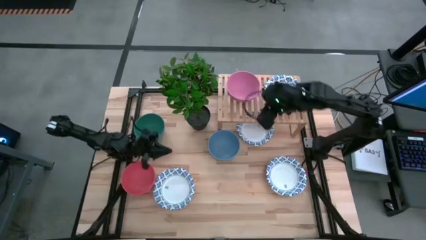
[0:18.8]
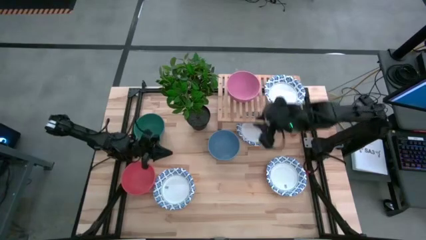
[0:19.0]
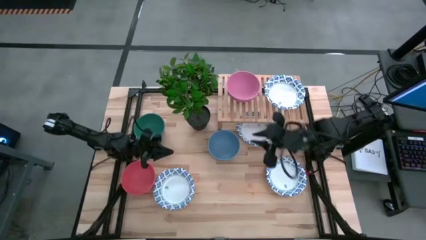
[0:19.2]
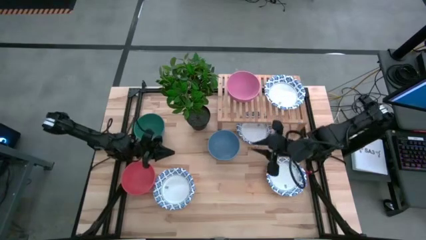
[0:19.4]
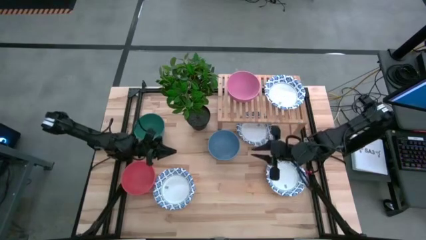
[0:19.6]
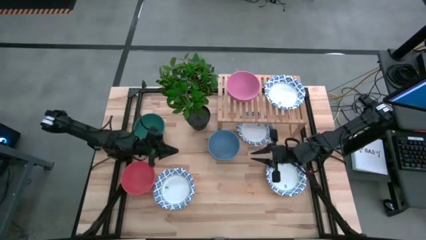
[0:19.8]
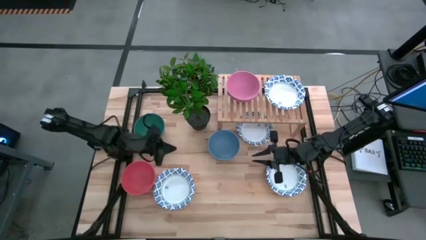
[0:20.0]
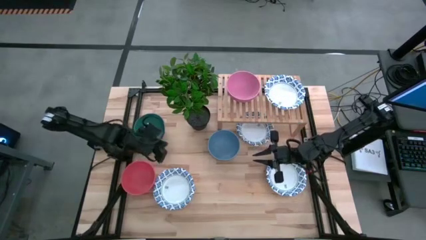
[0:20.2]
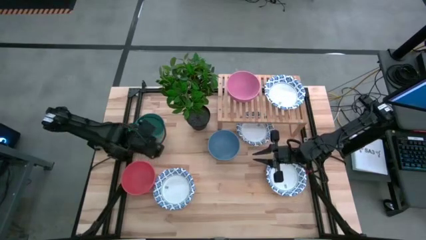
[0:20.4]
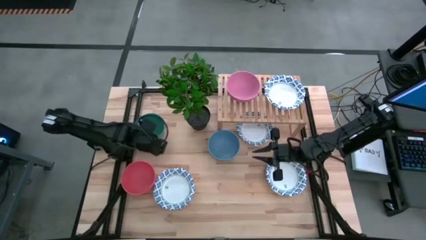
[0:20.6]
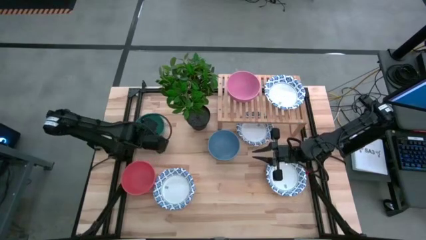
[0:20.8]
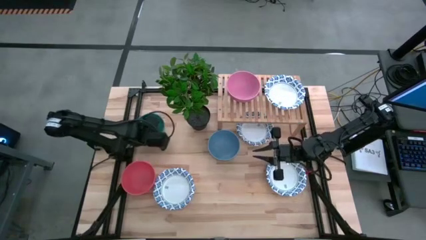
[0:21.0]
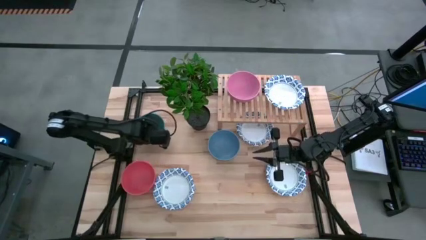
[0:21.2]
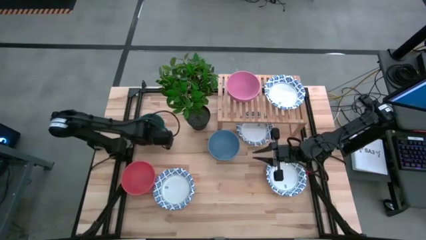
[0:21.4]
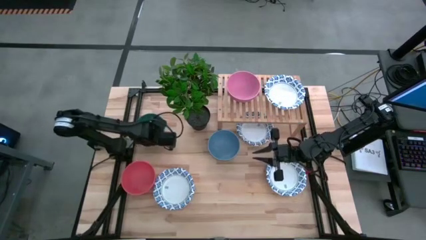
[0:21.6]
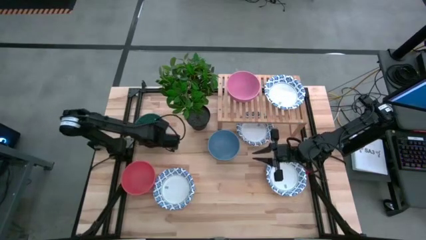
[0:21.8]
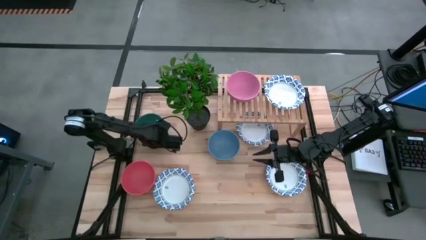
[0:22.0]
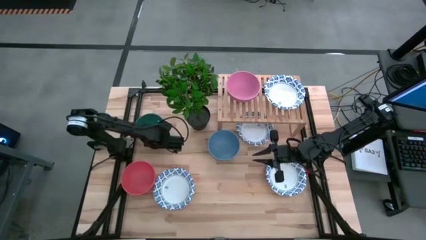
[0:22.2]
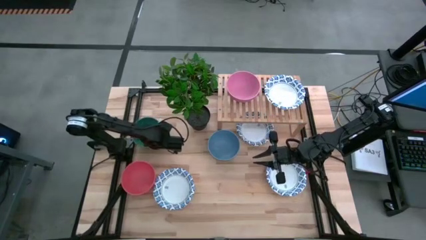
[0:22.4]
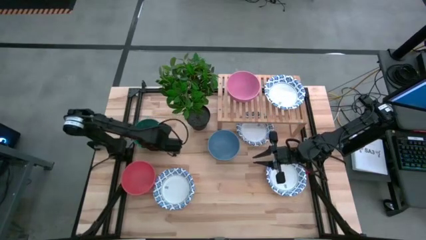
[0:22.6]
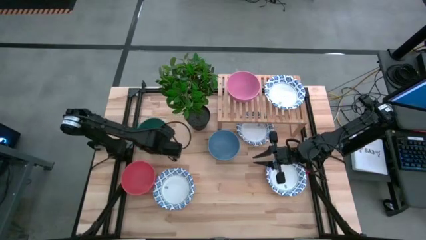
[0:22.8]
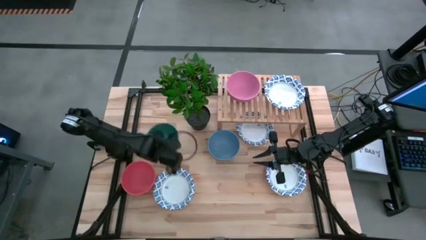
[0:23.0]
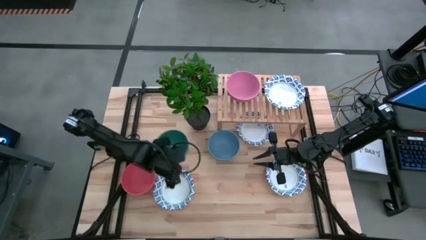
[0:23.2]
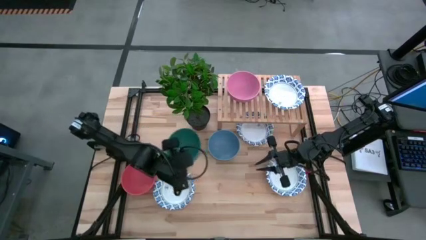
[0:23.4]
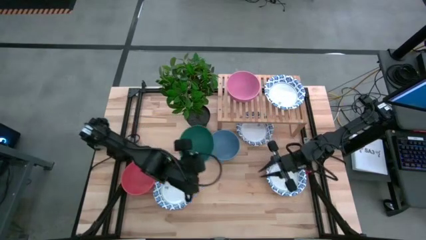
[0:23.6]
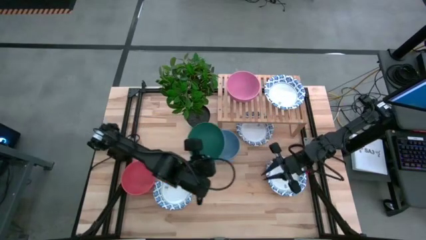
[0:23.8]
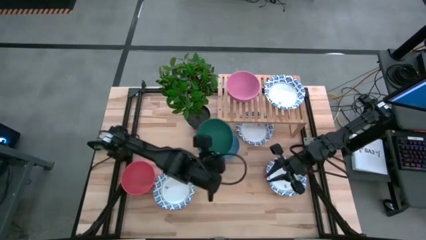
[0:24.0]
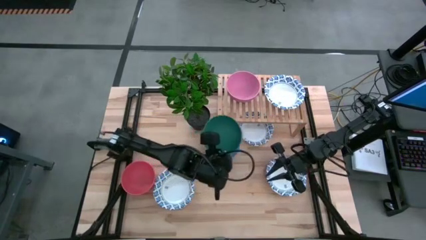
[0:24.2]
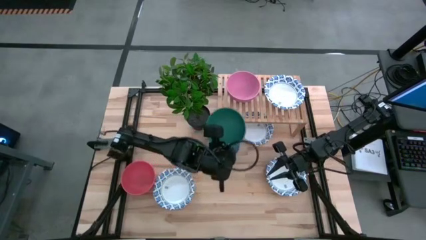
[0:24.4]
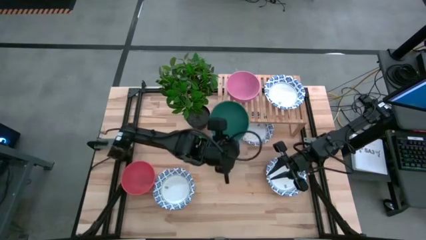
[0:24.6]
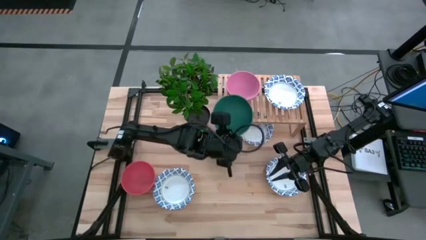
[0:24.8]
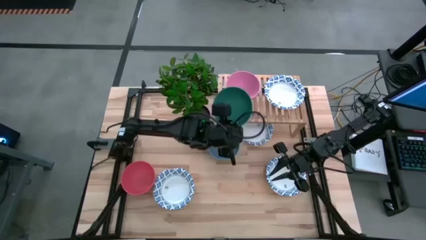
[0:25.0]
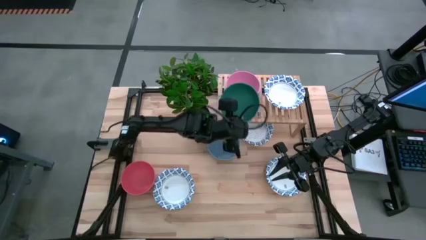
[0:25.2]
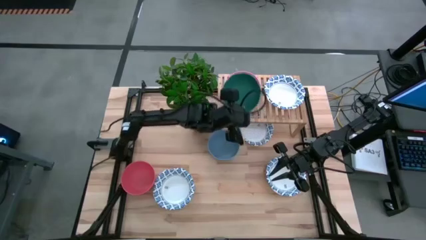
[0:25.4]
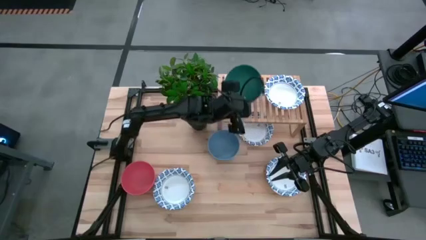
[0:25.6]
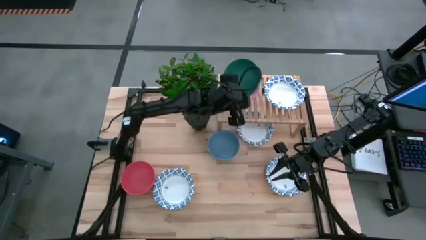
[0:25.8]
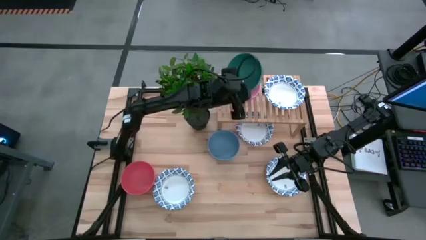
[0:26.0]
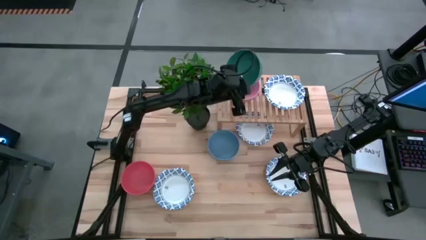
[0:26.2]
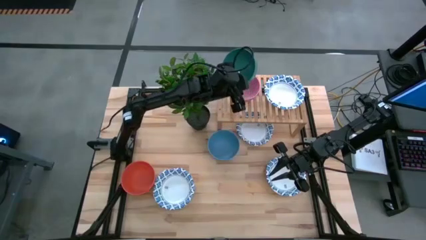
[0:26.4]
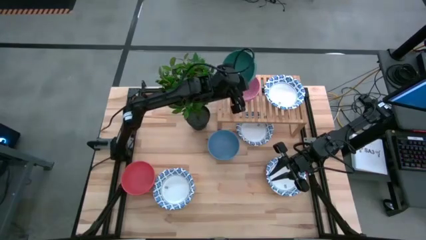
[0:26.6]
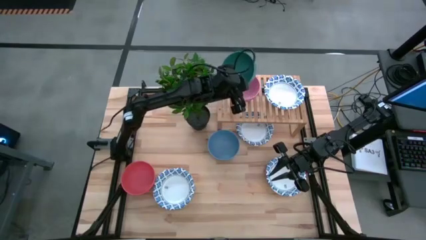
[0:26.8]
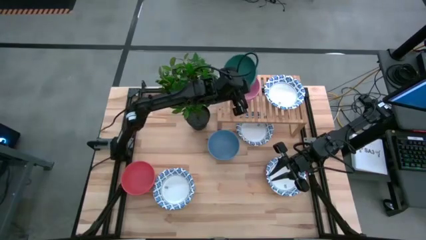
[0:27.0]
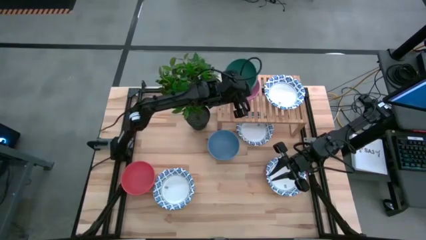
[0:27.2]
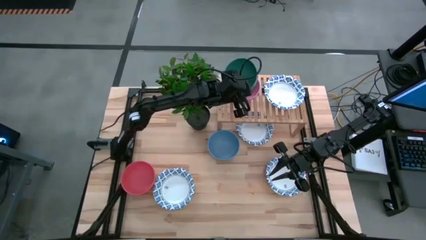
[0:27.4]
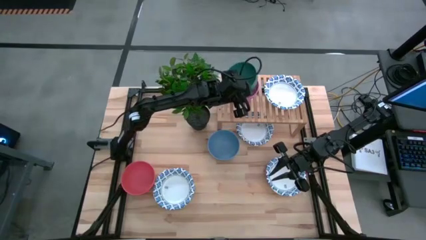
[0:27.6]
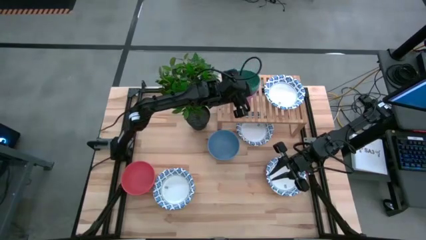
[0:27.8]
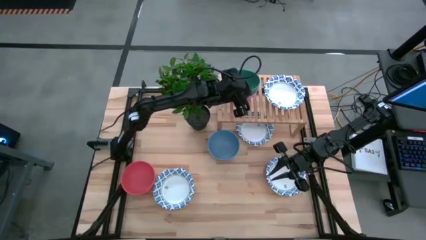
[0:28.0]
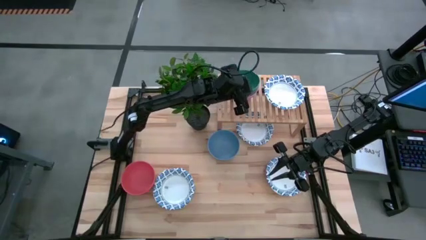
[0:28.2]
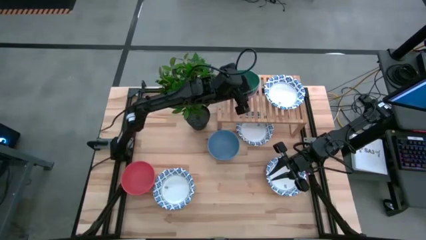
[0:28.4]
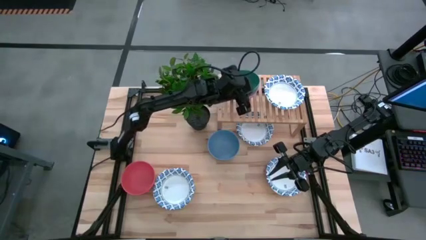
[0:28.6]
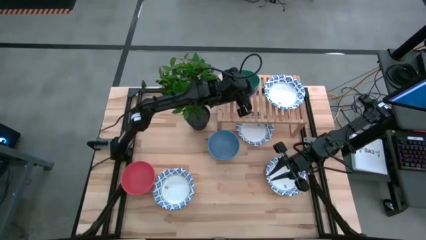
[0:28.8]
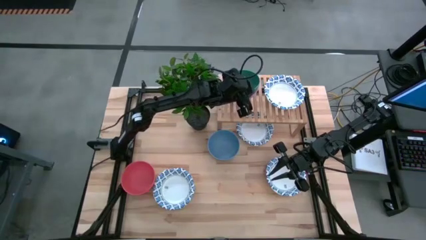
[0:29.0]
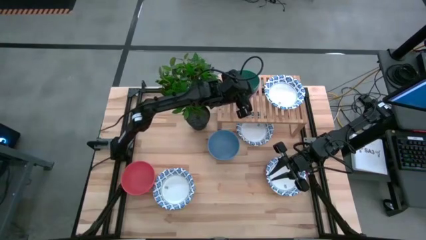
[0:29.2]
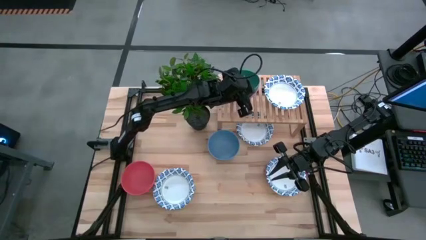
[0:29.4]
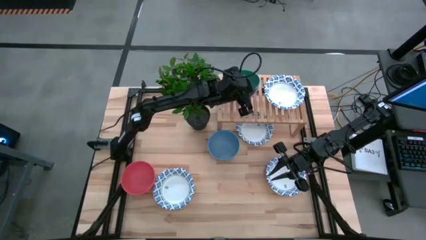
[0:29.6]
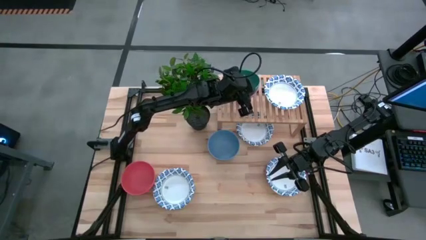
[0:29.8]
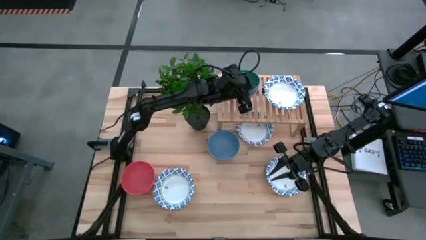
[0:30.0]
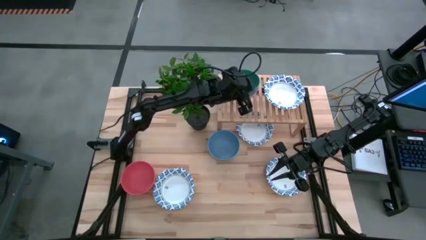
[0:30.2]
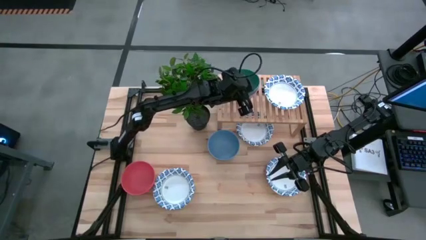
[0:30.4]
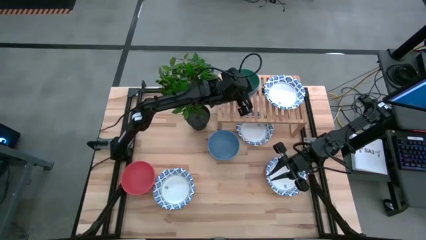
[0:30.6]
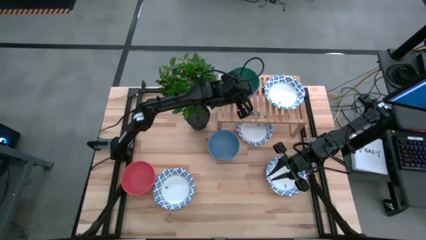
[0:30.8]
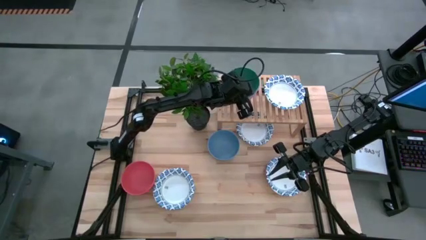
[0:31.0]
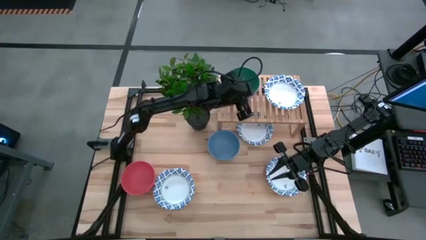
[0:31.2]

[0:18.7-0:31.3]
Task: Place and stack bowls onto a shelf
Stack the green bowl on top of the pink bowl on the shelf

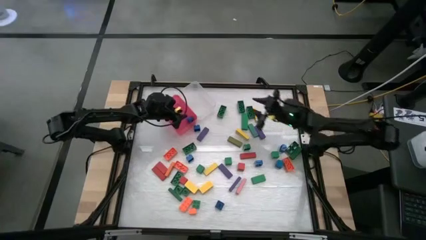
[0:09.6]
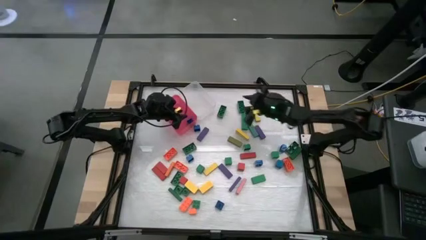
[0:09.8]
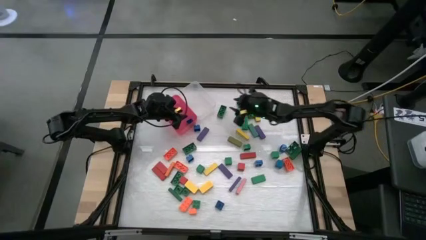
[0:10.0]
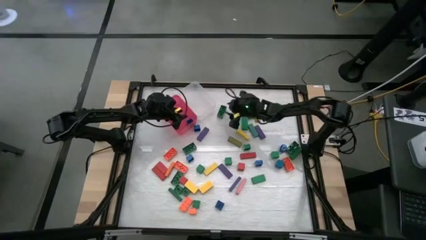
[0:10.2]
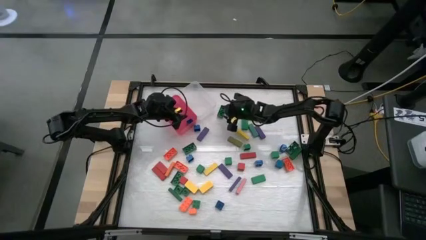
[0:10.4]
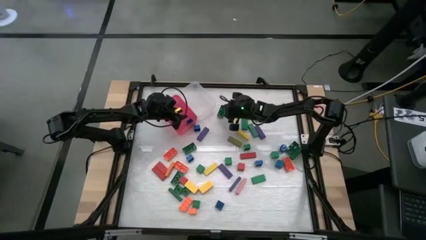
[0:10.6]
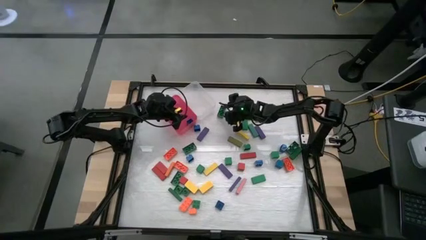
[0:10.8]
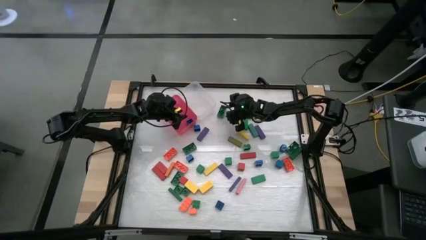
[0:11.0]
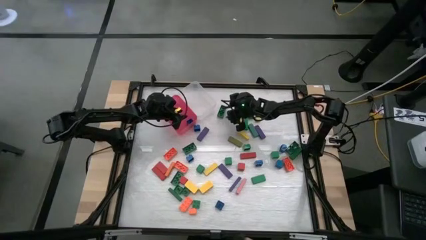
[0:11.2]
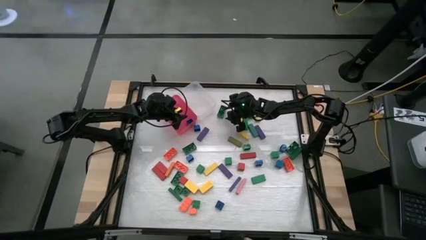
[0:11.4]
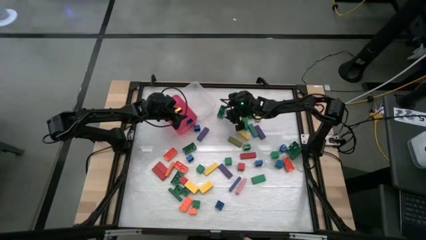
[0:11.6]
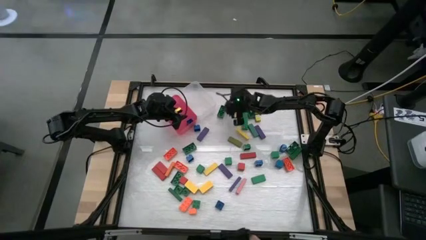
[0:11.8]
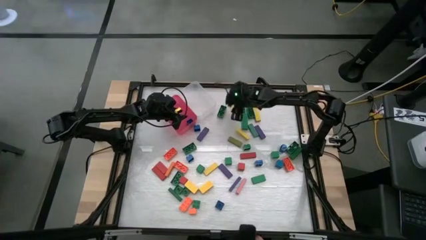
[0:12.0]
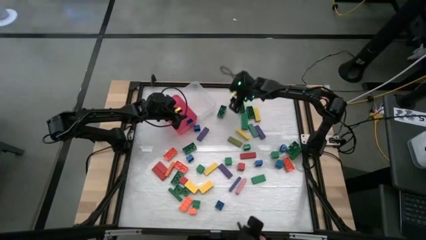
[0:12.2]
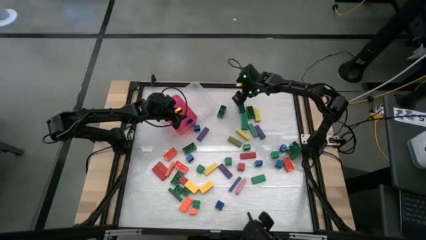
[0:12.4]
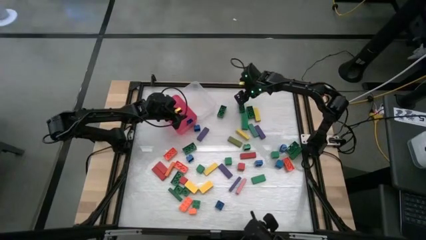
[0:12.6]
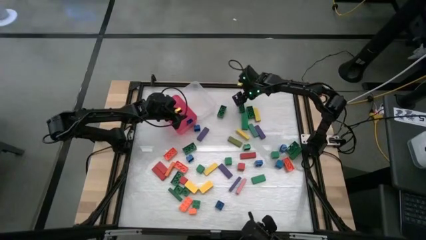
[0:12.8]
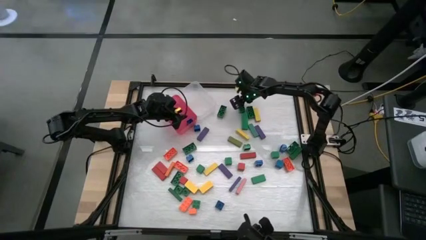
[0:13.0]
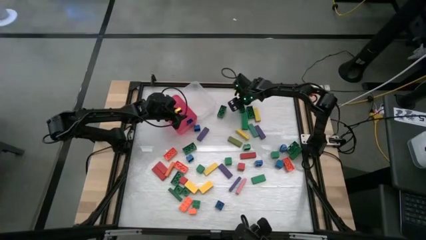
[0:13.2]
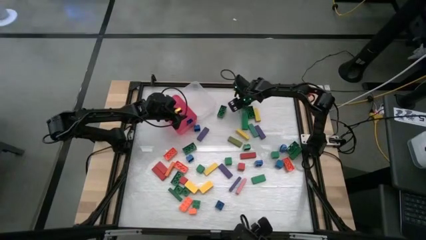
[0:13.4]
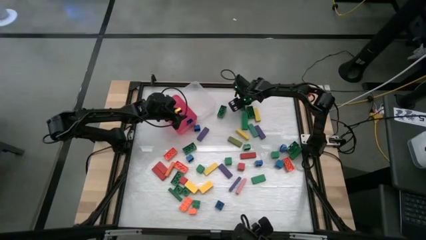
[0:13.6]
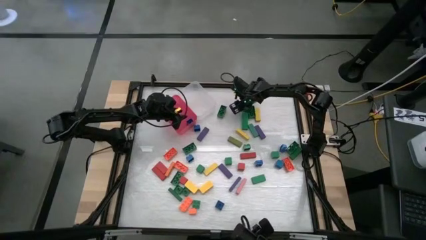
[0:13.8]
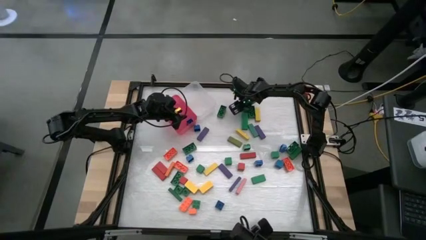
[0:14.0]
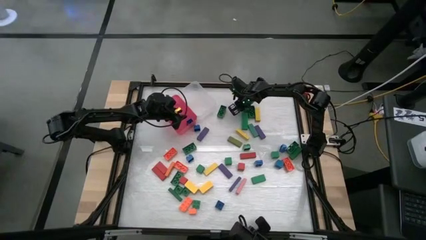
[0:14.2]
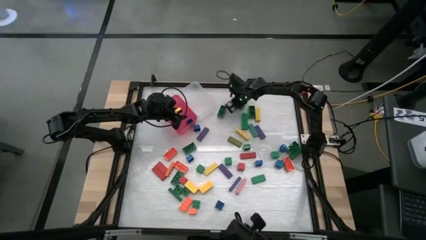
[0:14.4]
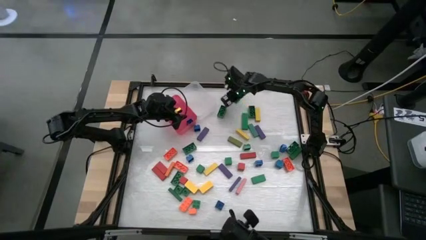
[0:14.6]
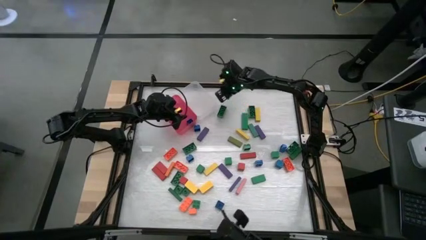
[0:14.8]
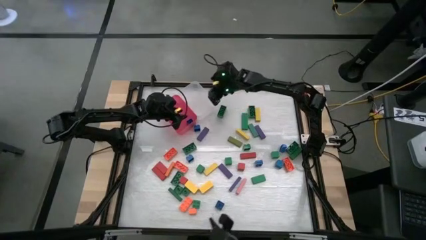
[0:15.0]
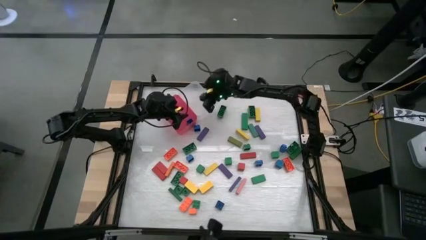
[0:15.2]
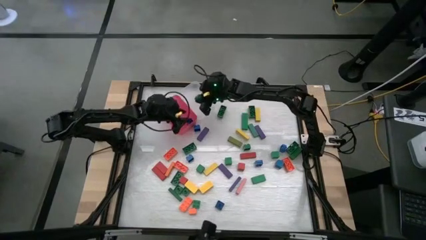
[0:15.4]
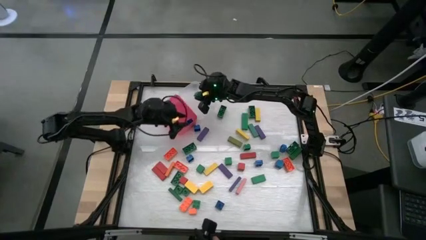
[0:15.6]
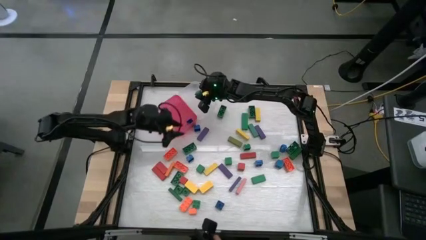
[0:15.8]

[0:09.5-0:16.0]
Task: Sort blocks by size
Put the big green game piece into the white bin
